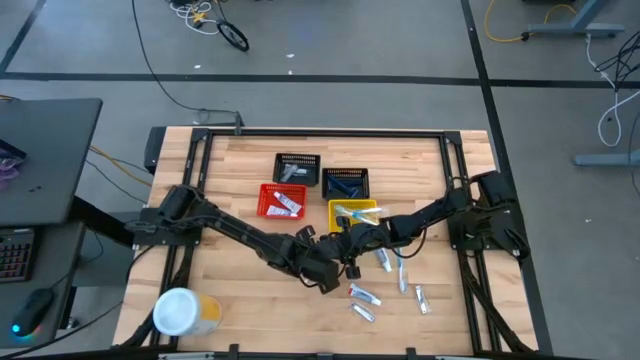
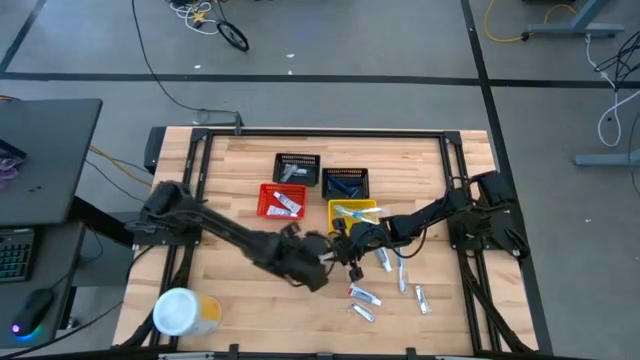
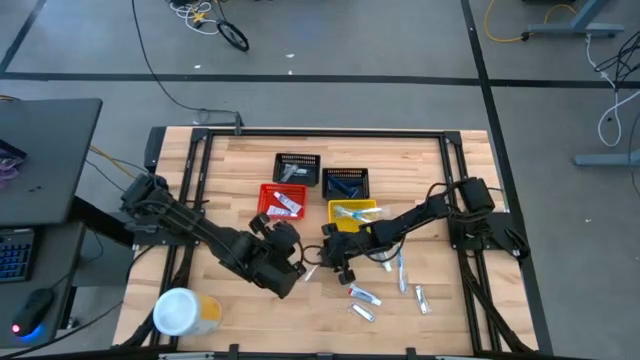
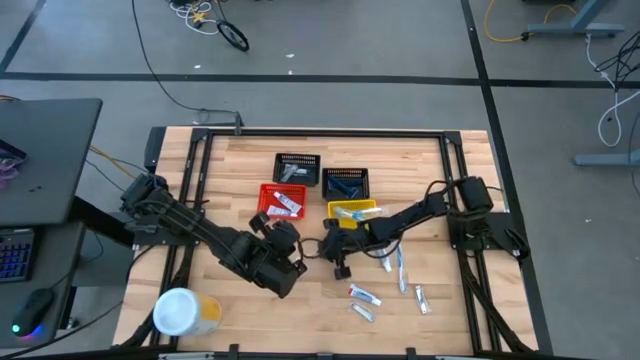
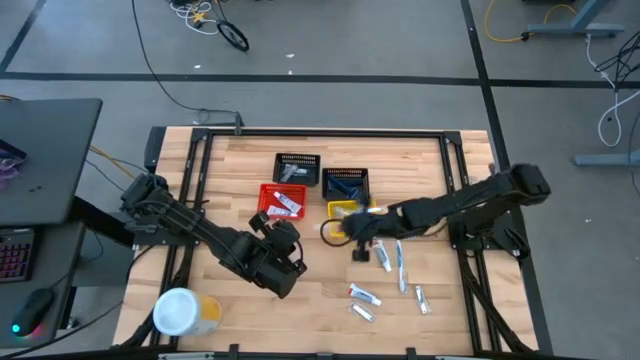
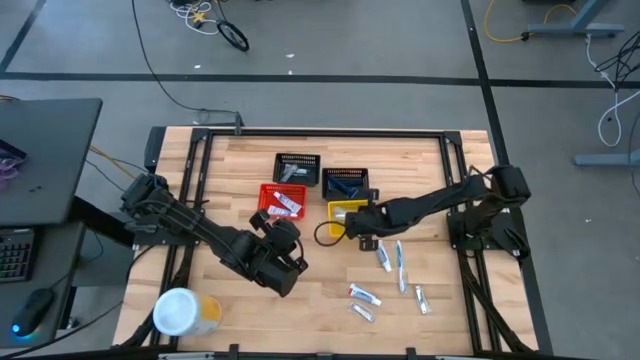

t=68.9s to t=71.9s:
Task: Pick & Place Travel size toiletries
Put the orange toothbrush into the yellow bin

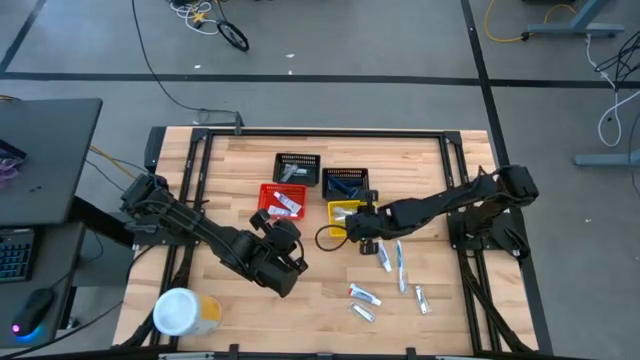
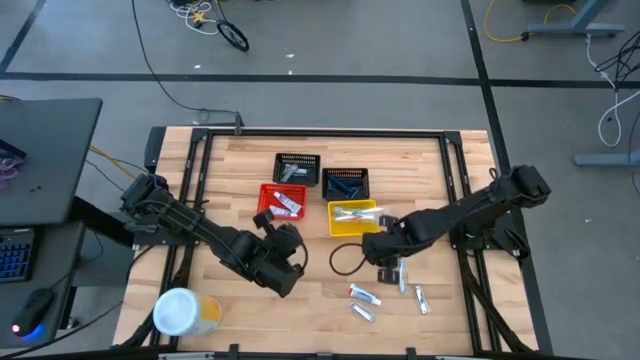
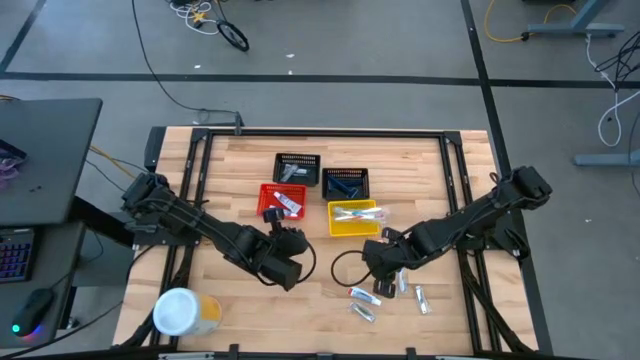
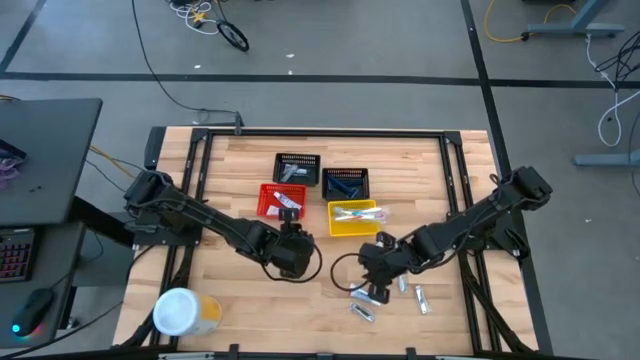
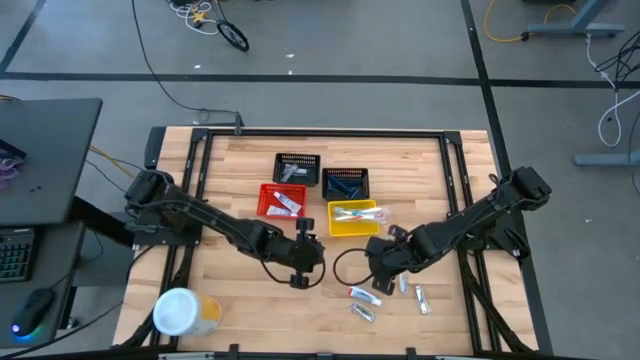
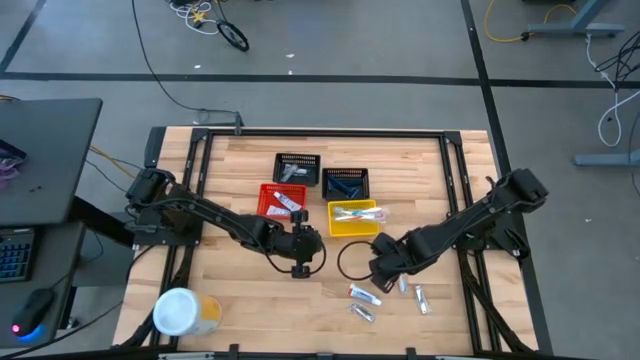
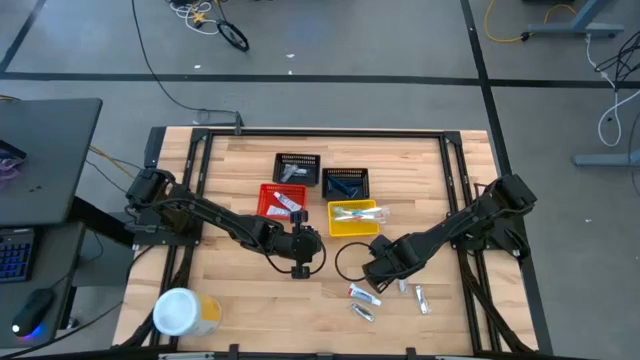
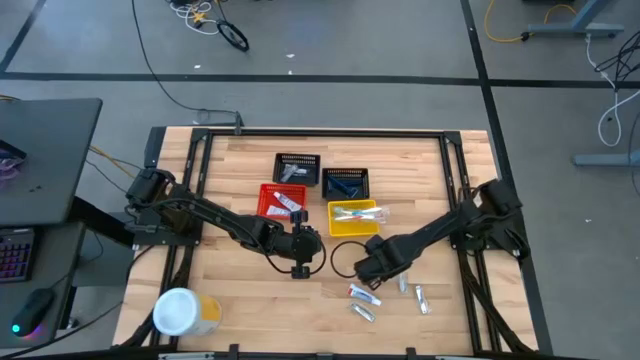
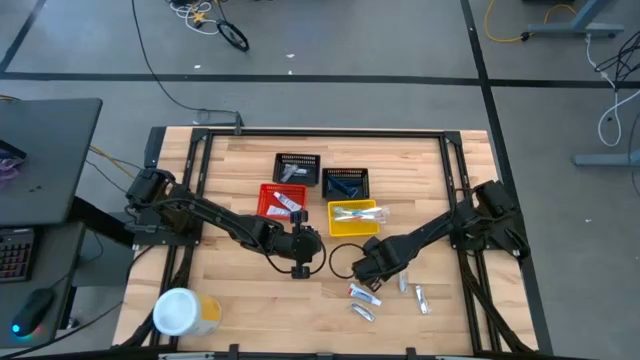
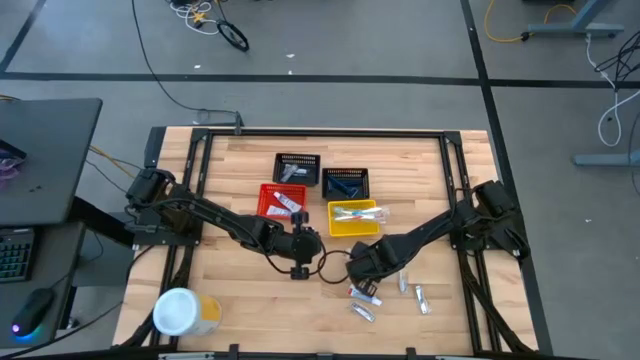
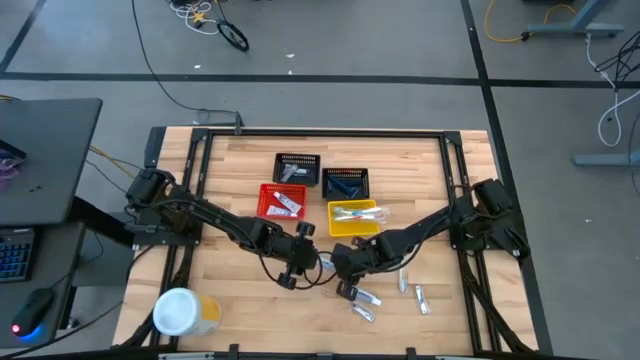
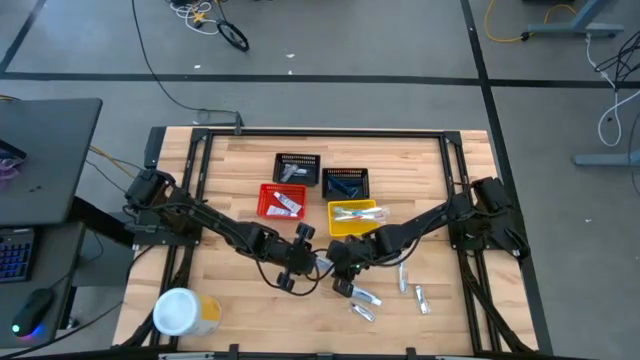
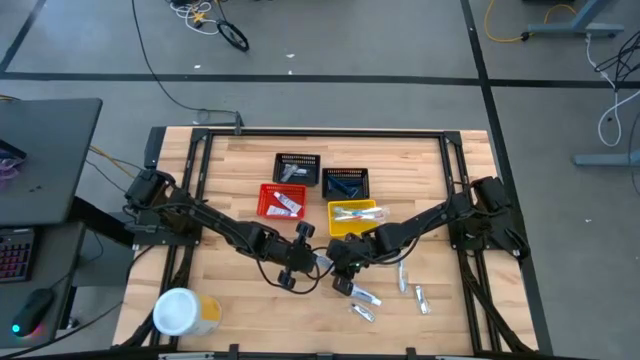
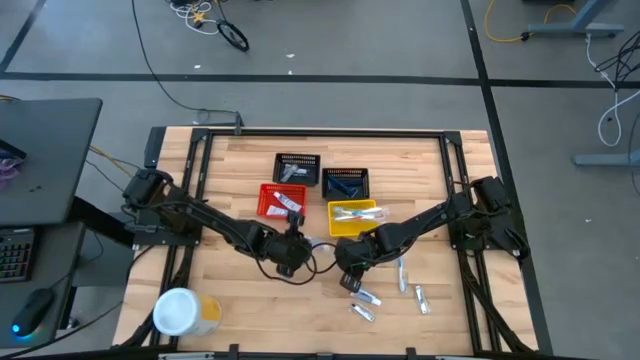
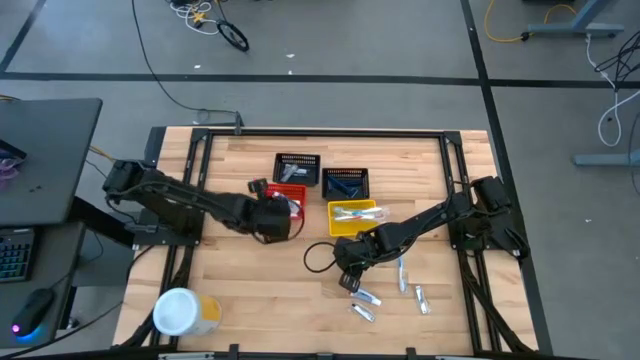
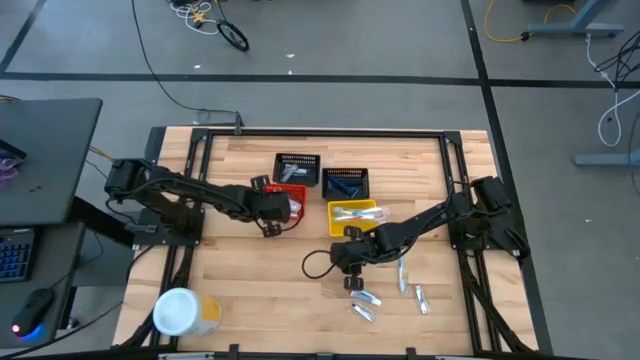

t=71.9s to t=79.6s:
Put the white toothpaste into the red bin

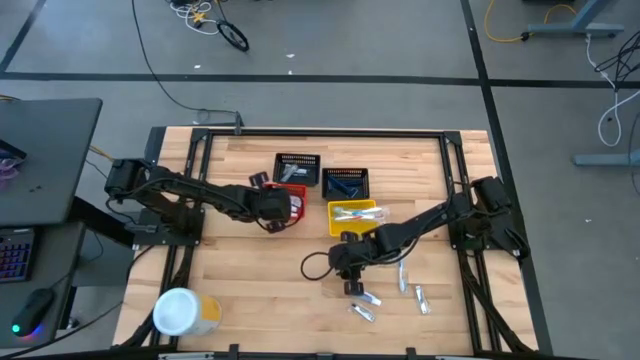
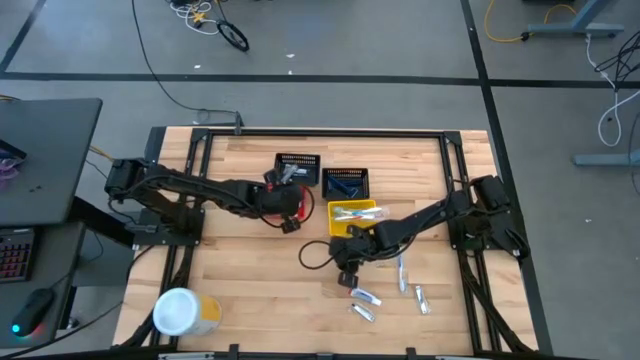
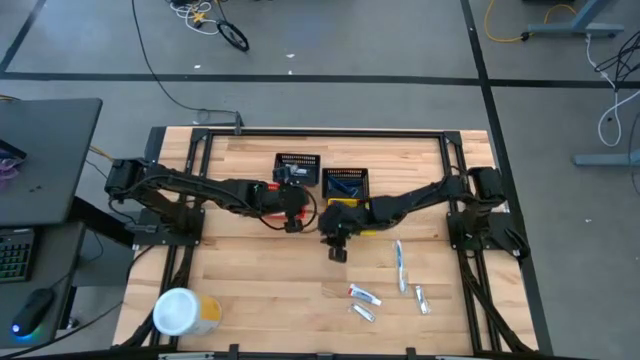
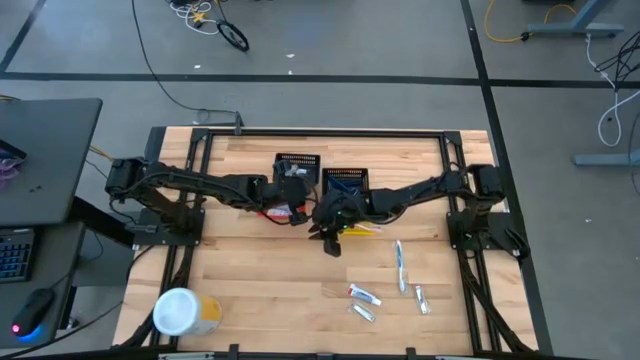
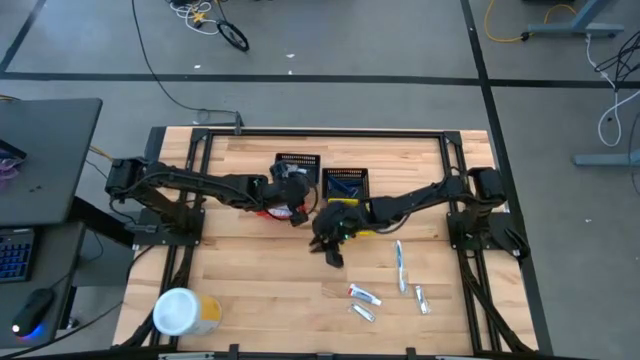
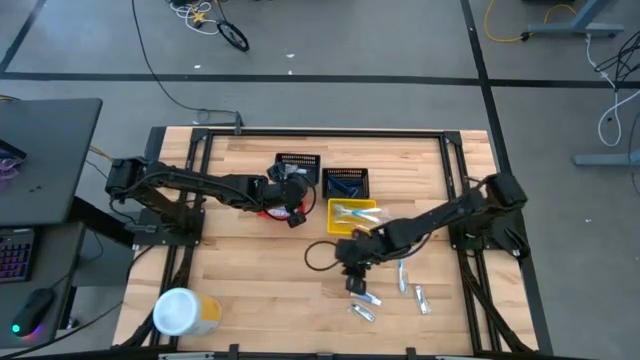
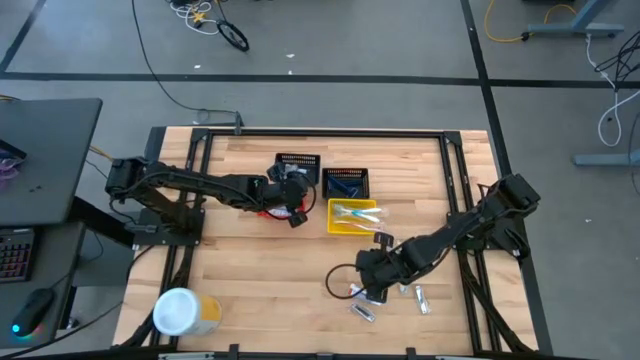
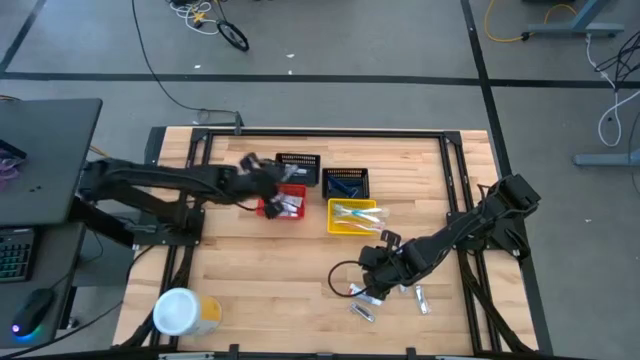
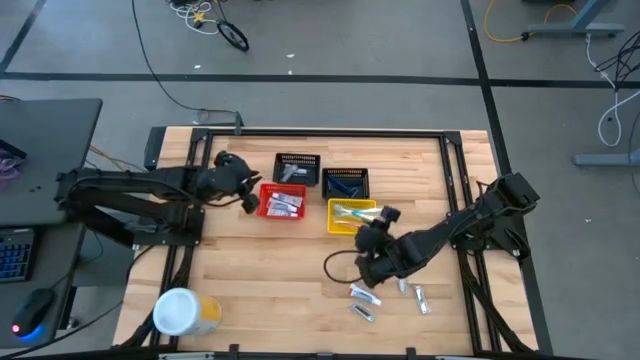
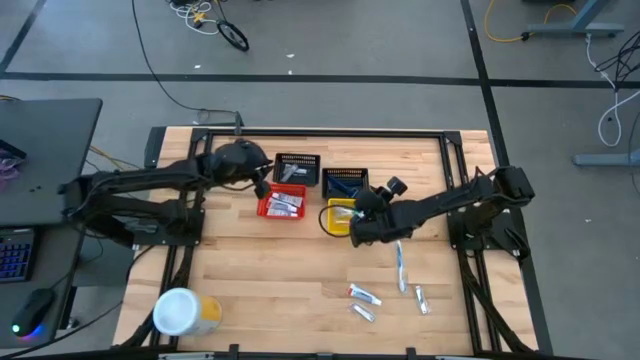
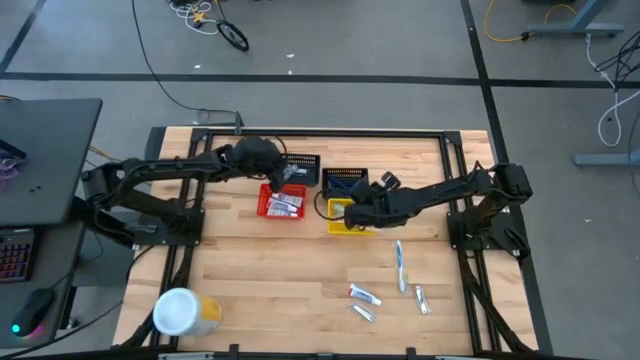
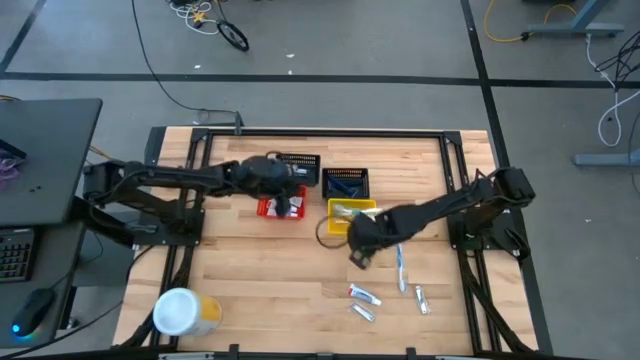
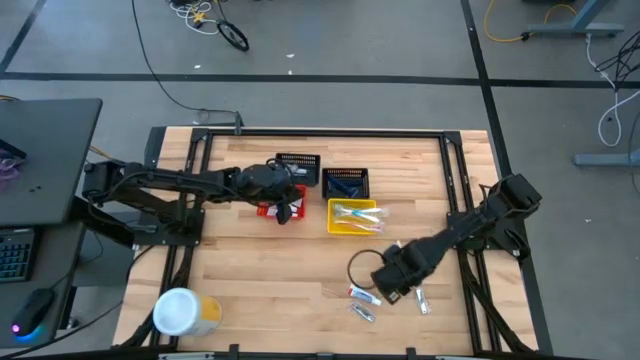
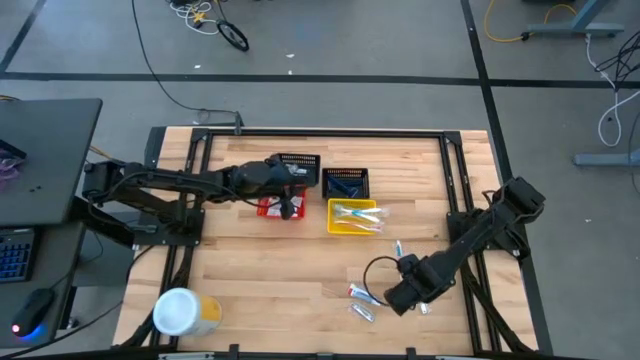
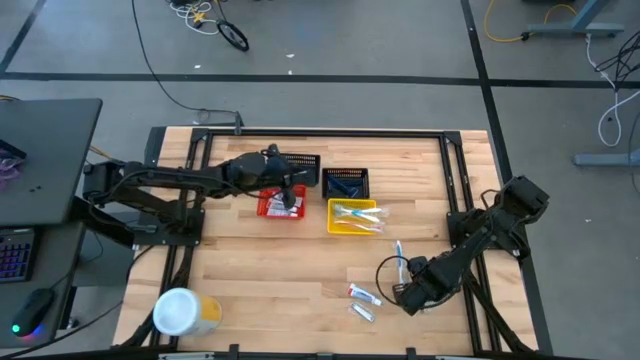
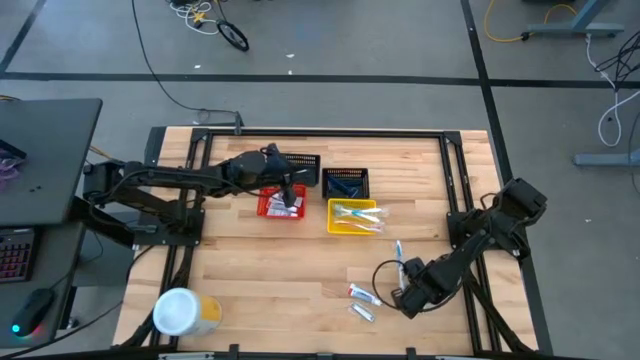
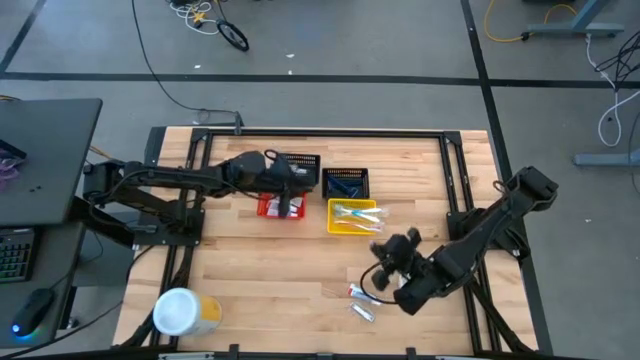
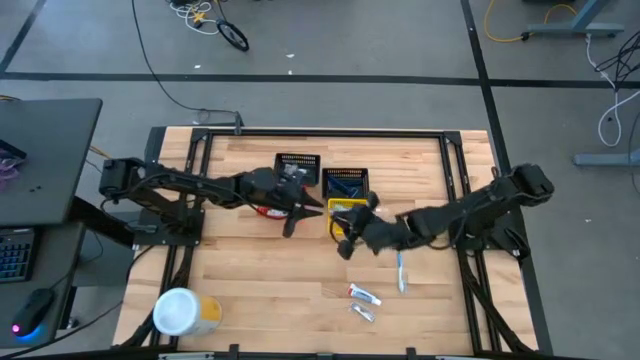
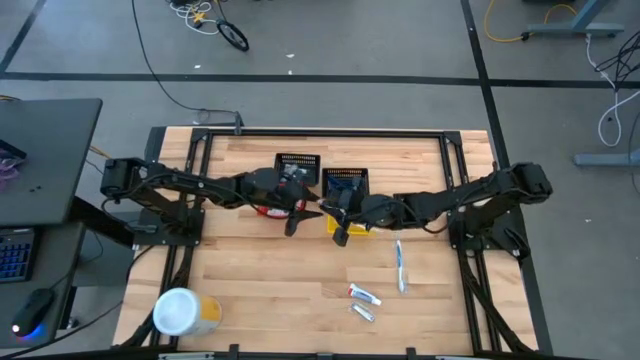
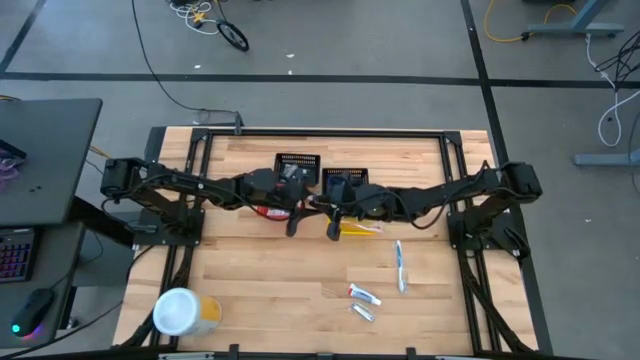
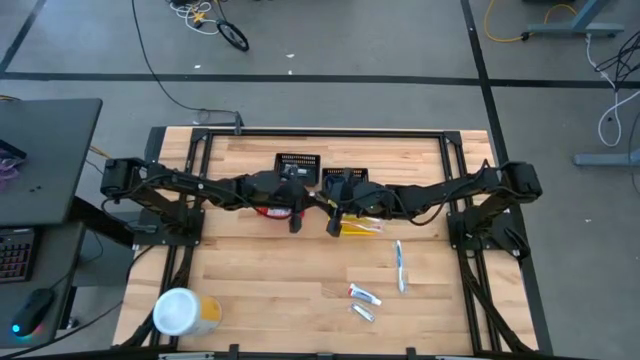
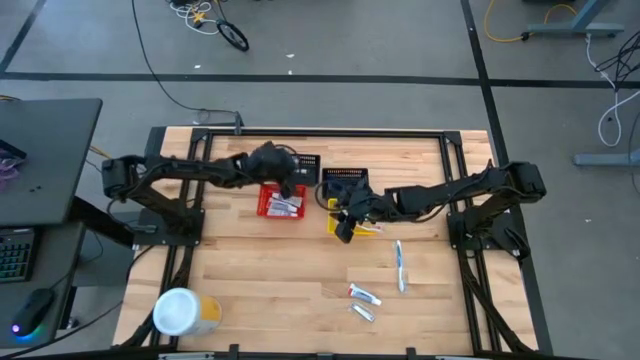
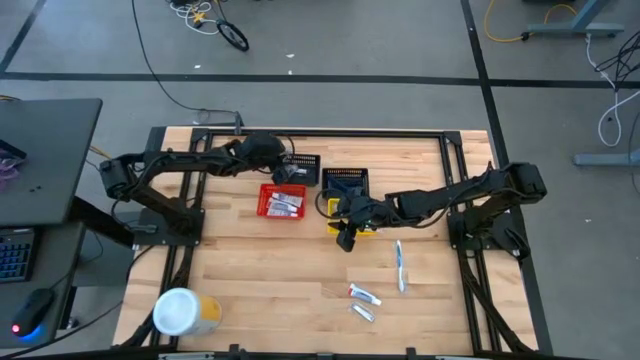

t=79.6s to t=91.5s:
Put the silver nail cutter into the left black bin
